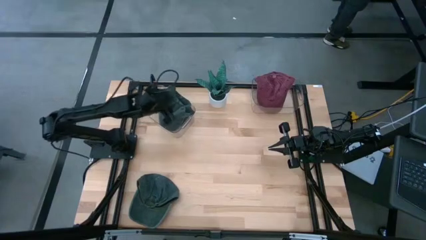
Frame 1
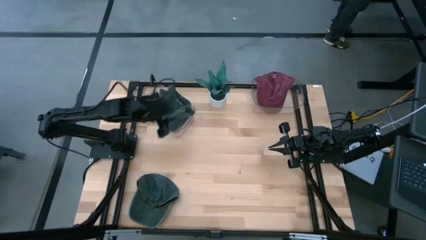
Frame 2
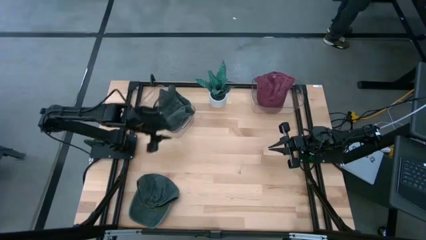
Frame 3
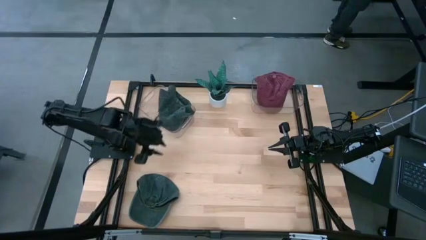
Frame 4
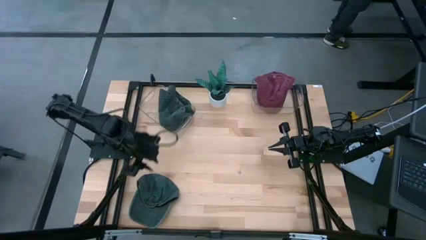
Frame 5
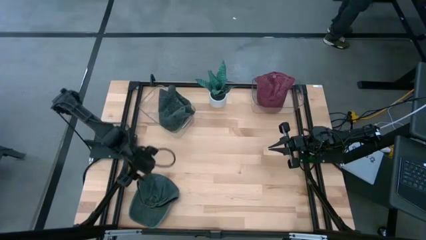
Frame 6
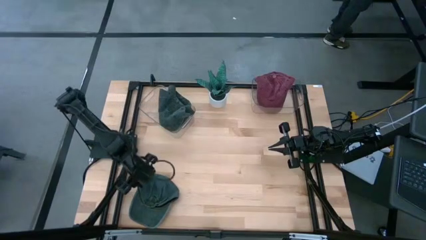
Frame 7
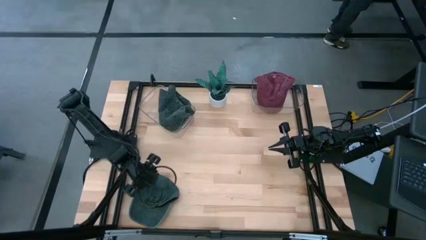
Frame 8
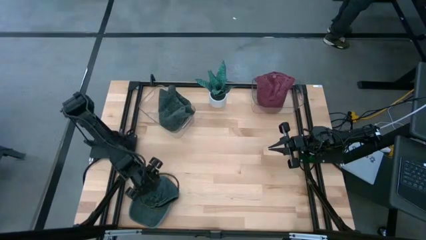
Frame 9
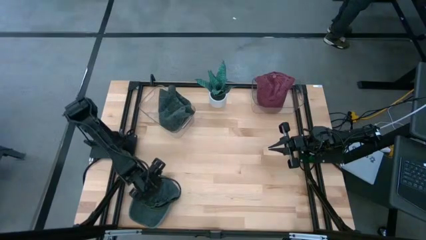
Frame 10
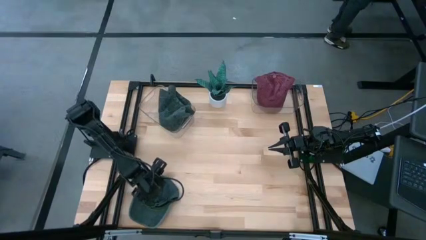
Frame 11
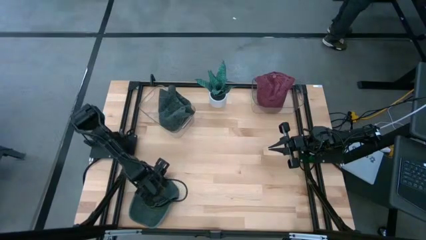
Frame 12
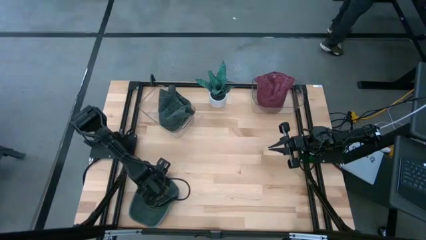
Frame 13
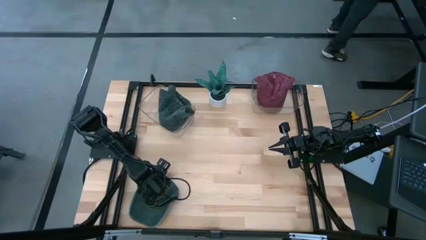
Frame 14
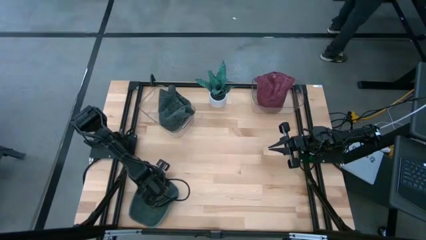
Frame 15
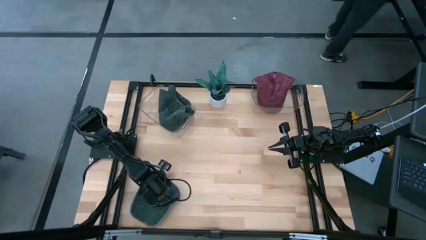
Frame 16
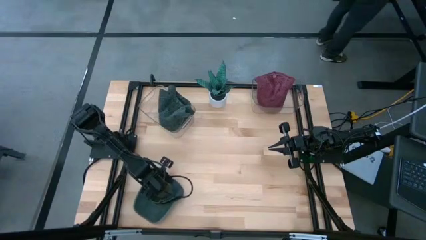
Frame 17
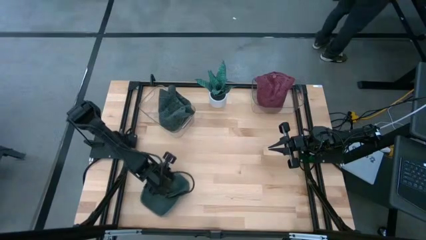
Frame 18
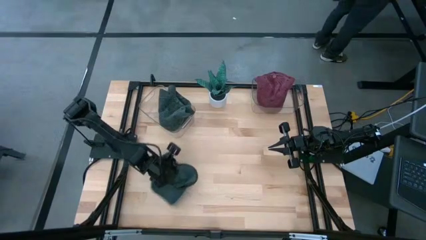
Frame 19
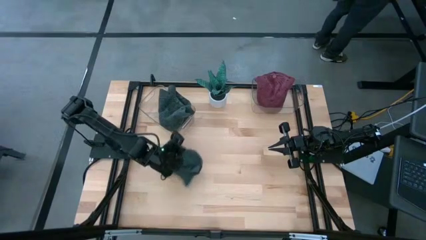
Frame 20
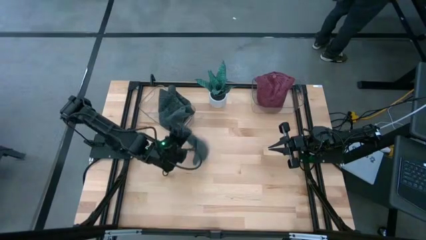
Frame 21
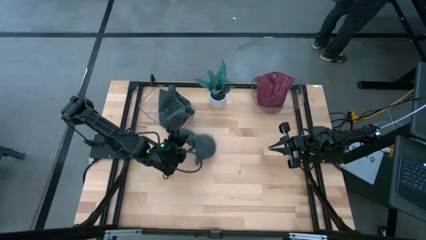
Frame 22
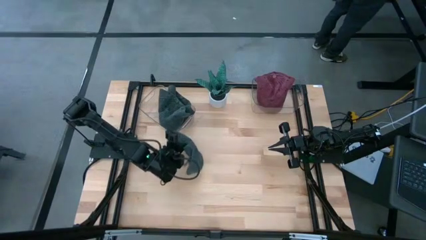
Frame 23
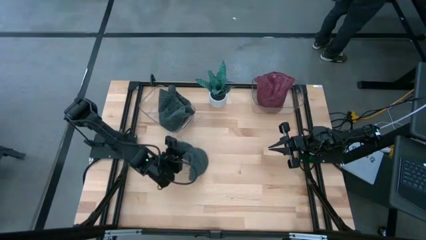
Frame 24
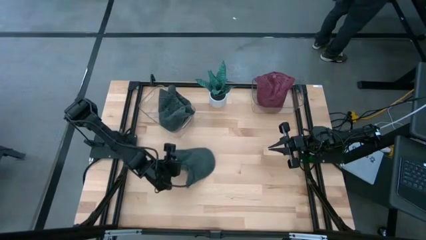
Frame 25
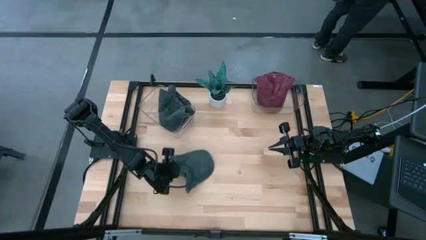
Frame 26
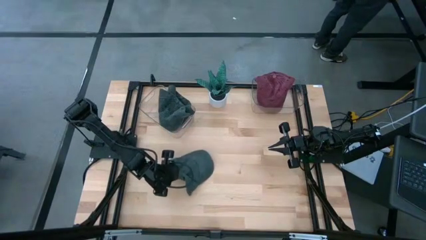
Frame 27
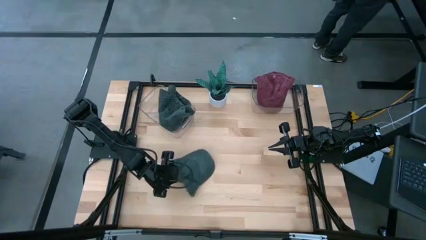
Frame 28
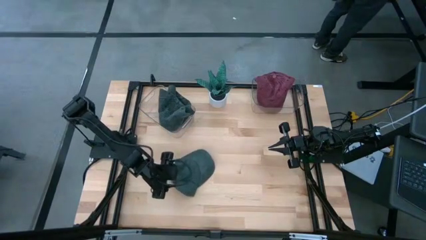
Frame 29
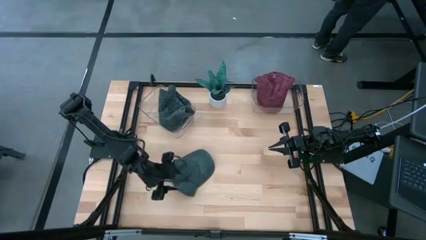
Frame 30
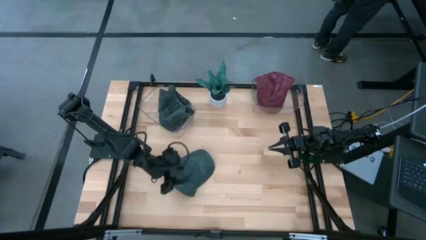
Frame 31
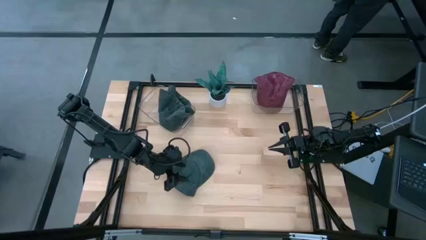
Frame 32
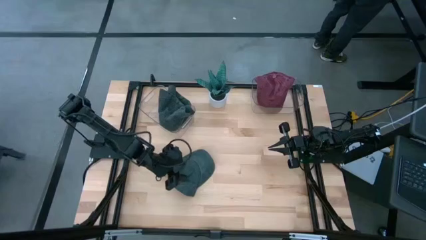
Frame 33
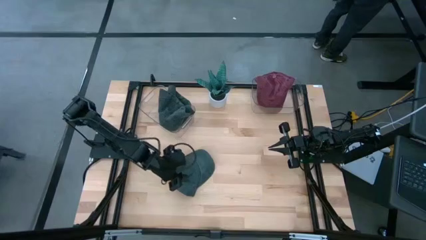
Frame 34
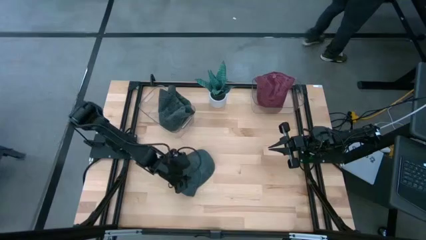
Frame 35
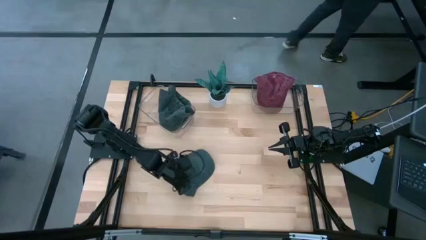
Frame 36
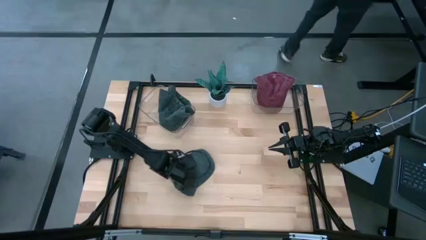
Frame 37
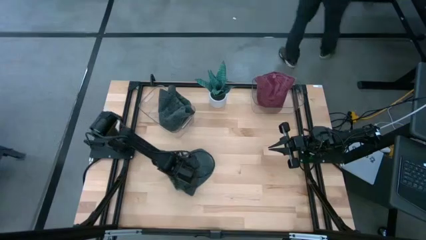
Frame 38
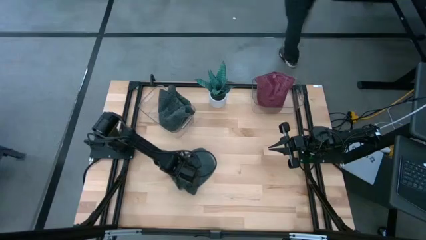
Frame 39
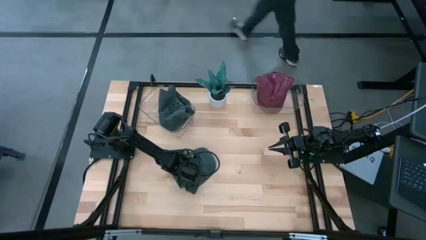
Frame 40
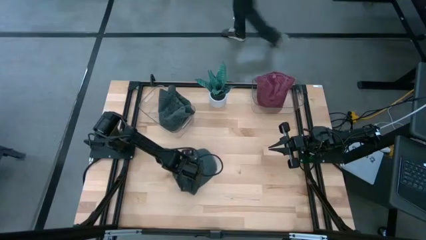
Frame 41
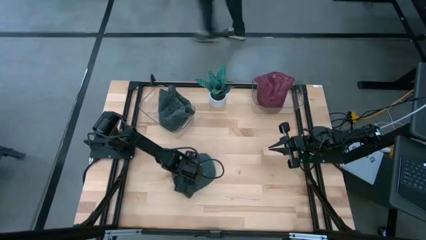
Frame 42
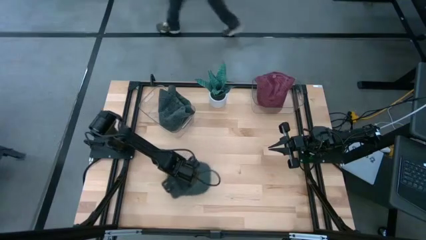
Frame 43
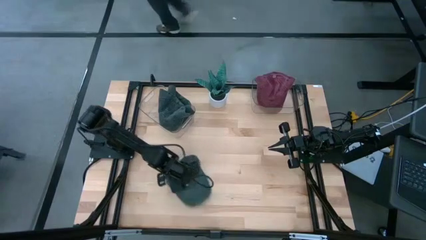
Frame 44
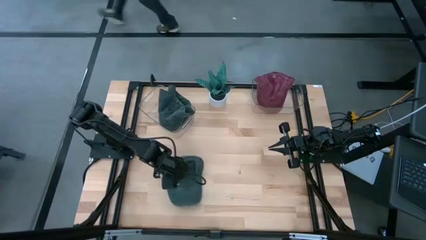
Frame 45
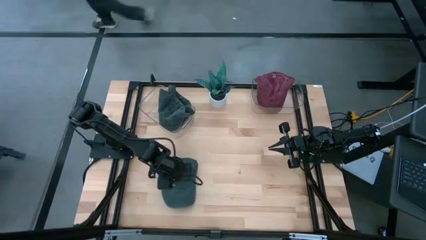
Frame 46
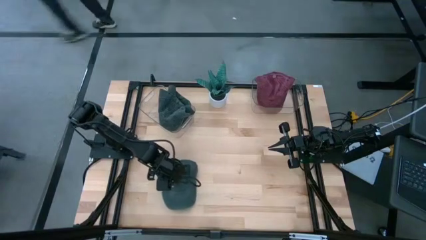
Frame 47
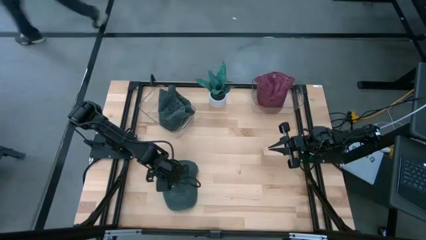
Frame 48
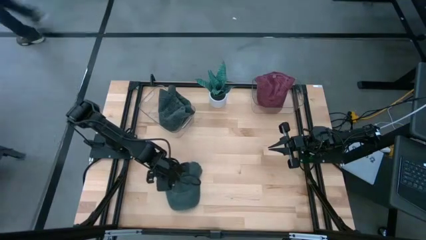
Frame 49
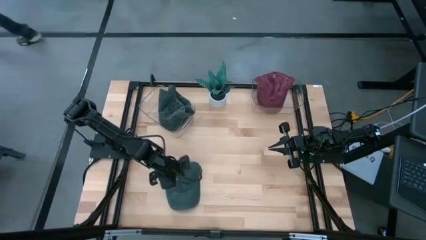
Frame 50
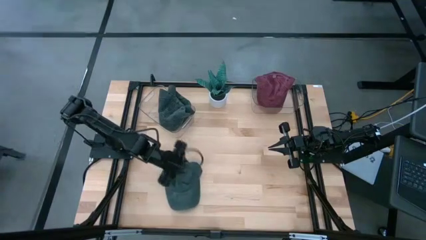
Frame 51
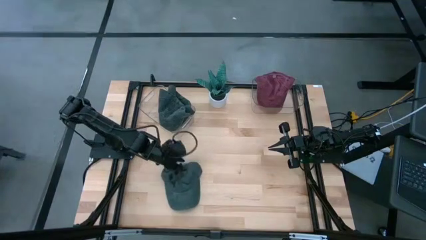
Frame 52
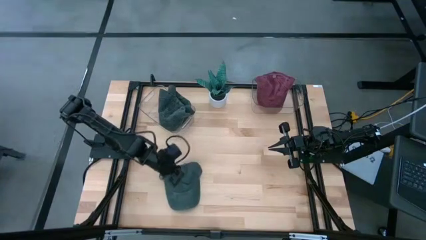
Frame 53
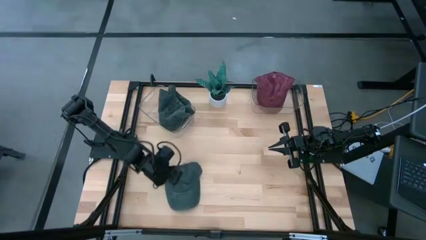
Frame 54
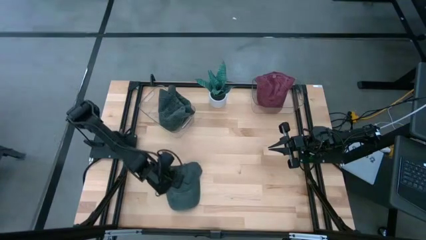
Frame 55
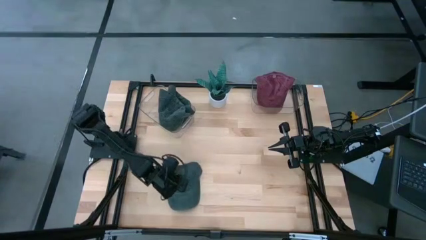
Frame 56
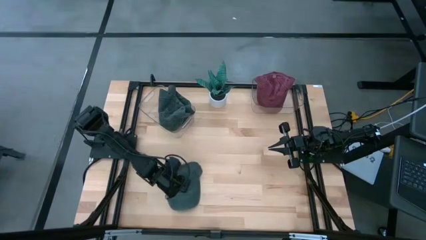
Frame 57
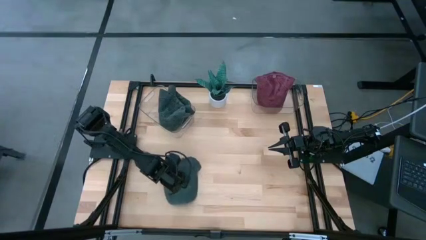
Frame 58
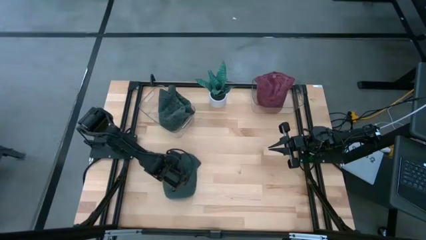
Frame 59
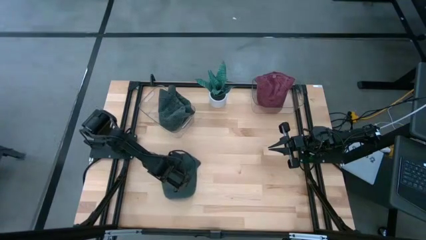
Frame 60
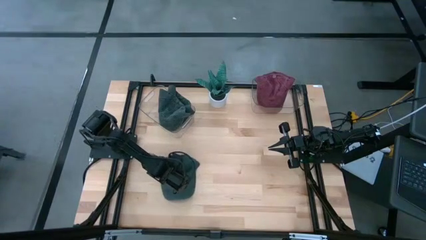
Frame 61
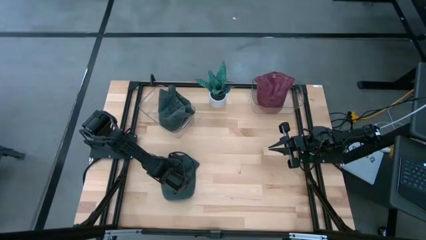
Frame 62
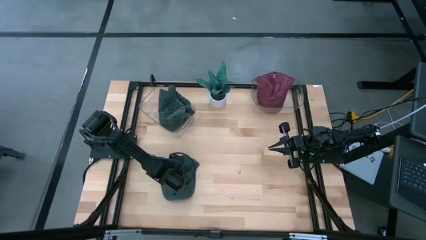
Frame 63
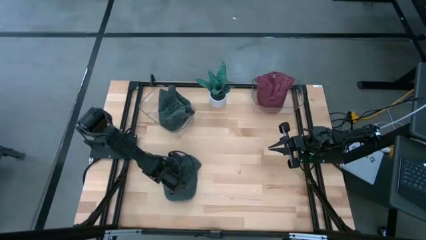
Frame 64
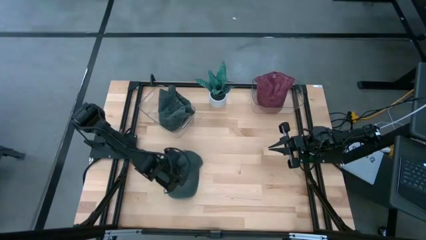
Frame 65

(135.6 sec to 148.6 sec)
Task: Pick & Place hat
Put the black cap into the left transparent bin
